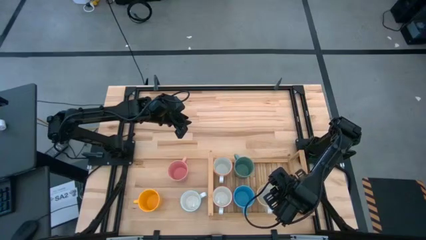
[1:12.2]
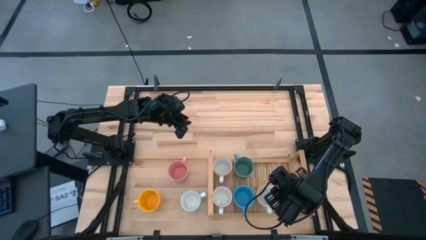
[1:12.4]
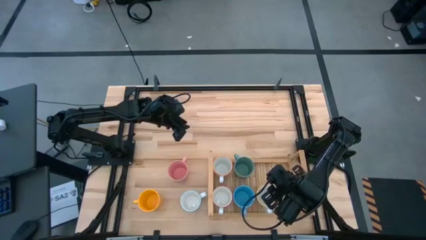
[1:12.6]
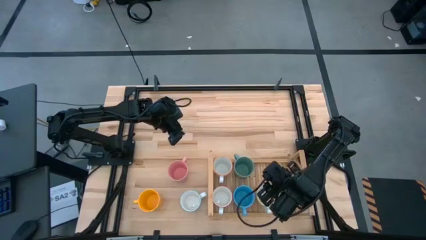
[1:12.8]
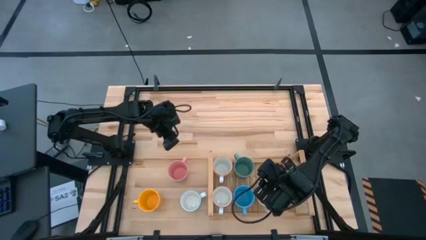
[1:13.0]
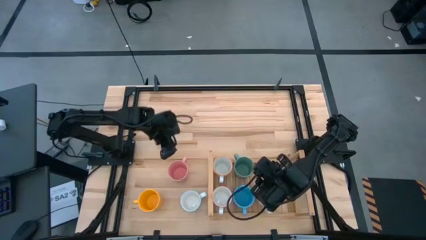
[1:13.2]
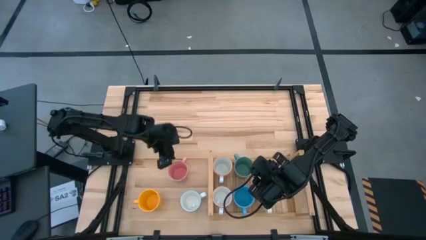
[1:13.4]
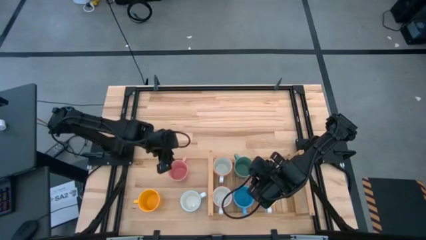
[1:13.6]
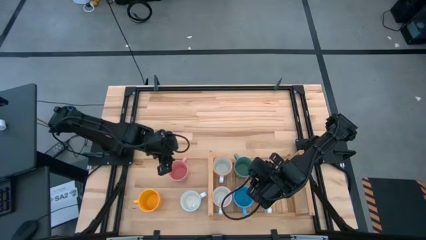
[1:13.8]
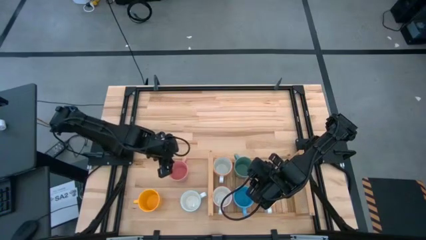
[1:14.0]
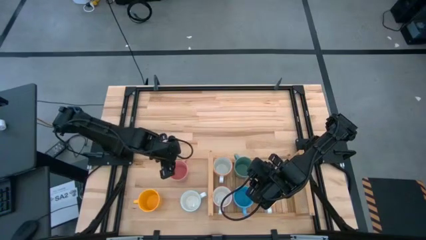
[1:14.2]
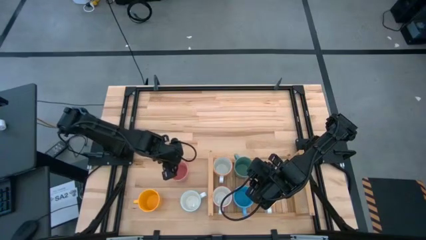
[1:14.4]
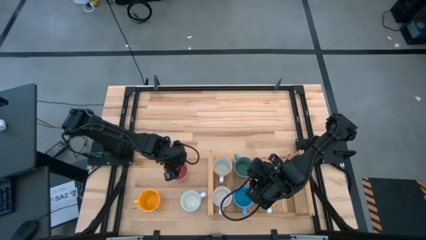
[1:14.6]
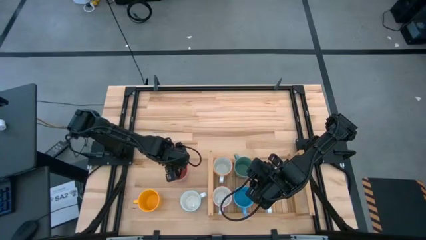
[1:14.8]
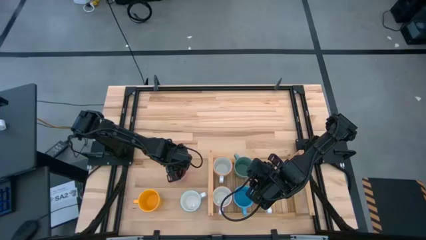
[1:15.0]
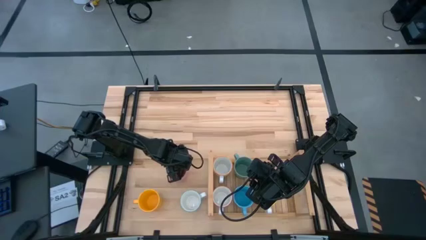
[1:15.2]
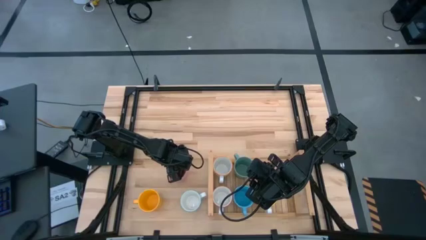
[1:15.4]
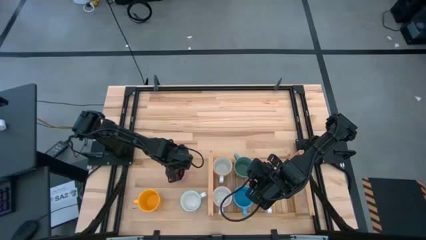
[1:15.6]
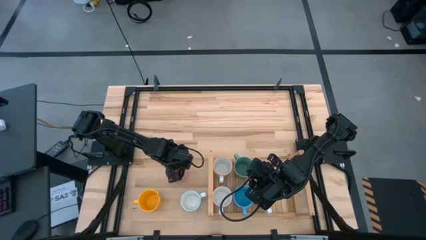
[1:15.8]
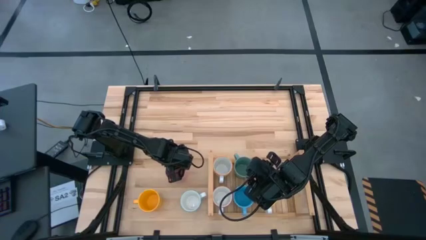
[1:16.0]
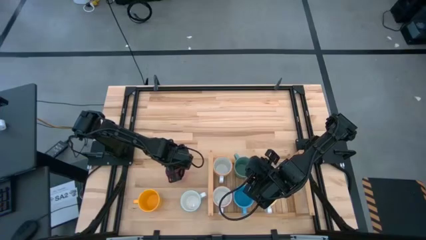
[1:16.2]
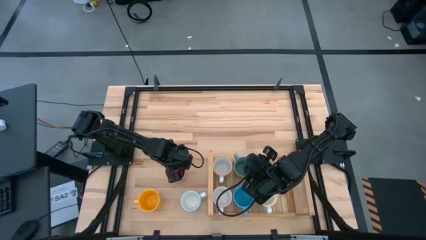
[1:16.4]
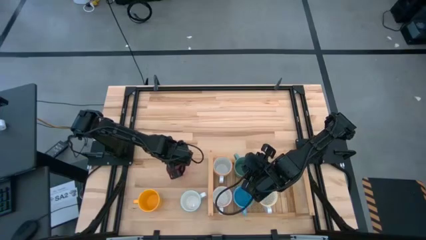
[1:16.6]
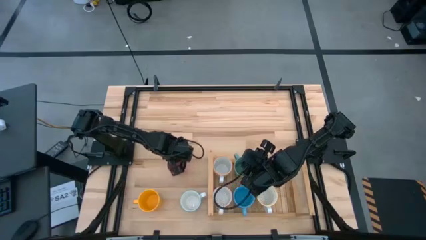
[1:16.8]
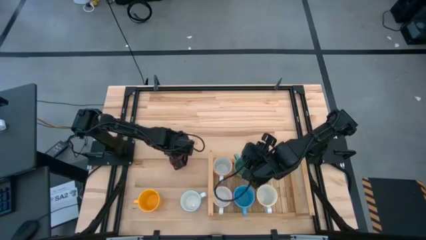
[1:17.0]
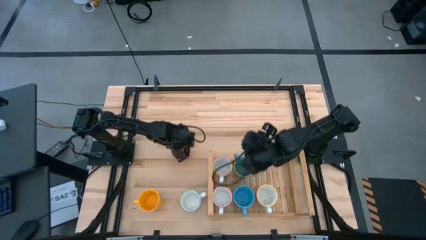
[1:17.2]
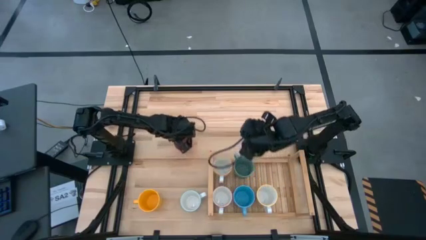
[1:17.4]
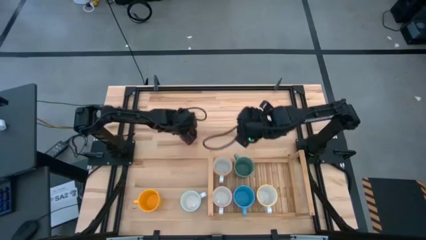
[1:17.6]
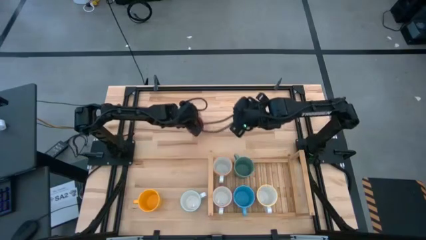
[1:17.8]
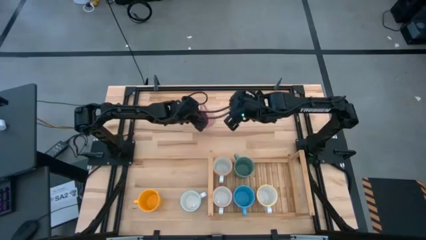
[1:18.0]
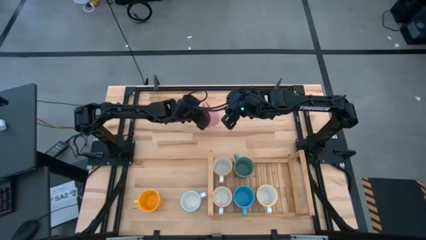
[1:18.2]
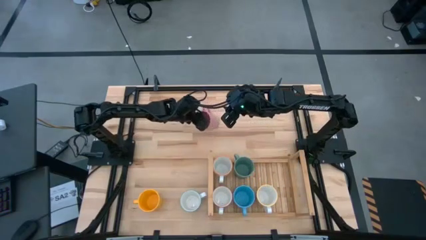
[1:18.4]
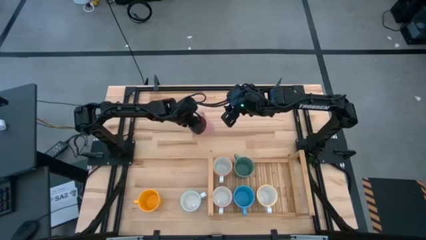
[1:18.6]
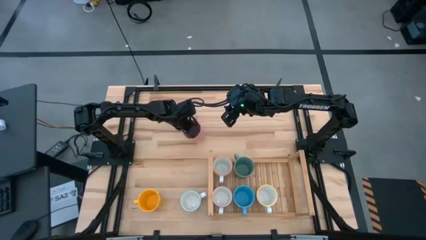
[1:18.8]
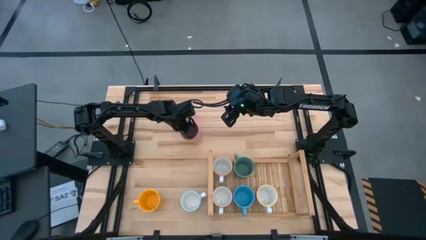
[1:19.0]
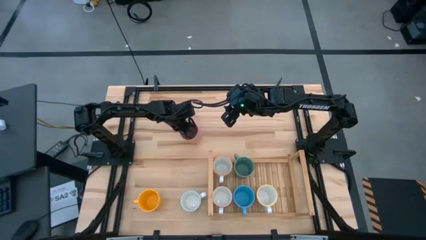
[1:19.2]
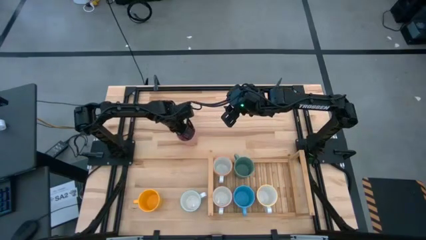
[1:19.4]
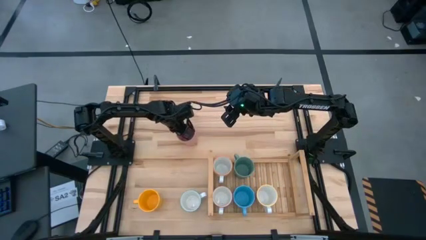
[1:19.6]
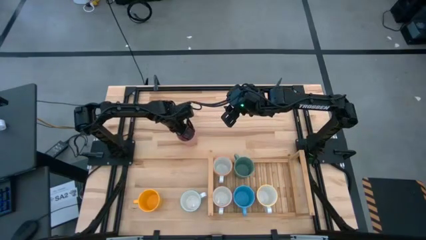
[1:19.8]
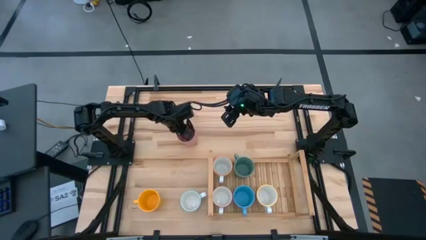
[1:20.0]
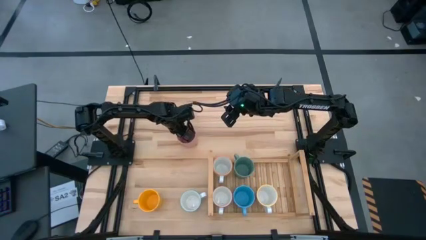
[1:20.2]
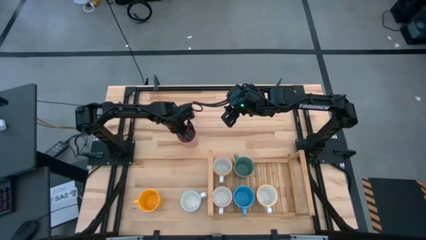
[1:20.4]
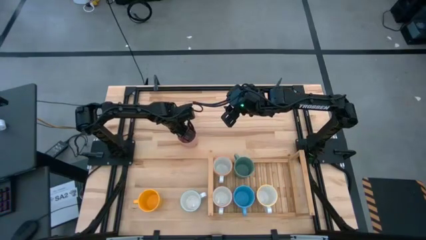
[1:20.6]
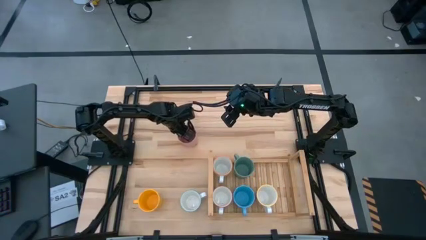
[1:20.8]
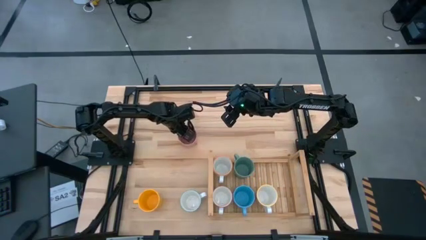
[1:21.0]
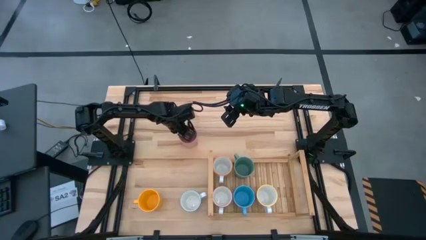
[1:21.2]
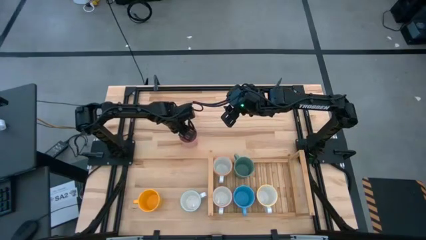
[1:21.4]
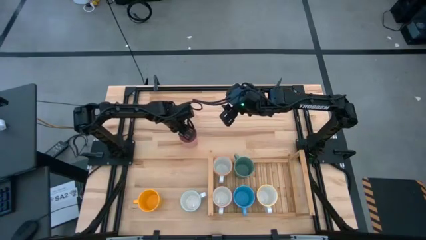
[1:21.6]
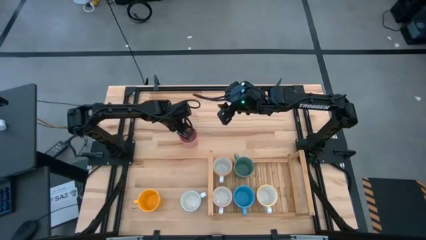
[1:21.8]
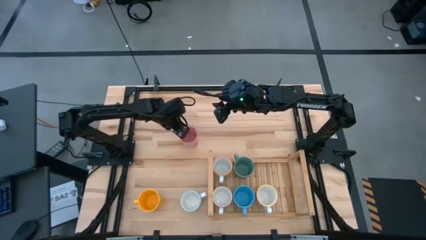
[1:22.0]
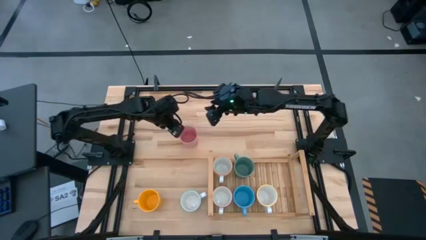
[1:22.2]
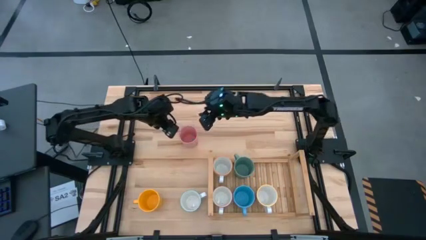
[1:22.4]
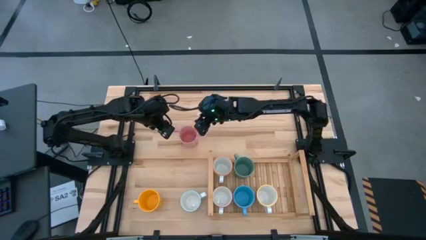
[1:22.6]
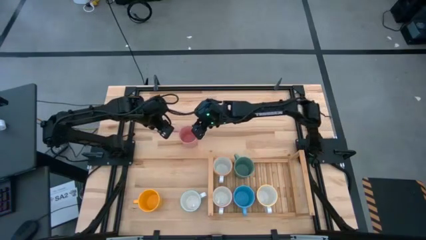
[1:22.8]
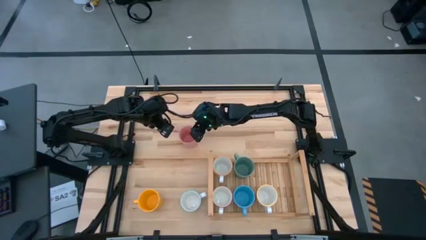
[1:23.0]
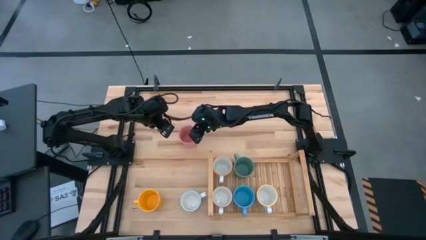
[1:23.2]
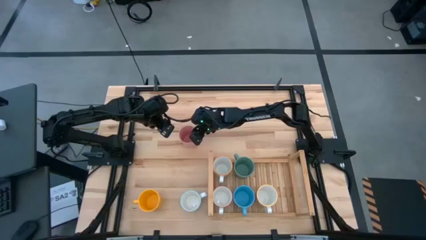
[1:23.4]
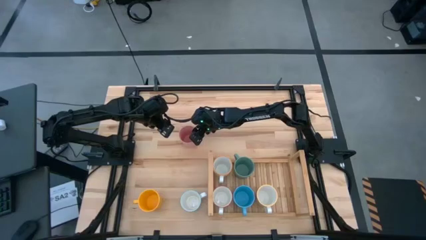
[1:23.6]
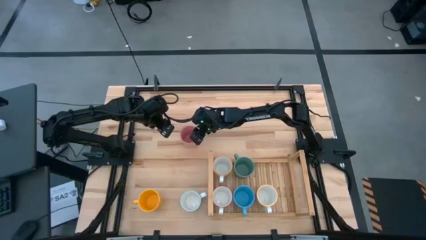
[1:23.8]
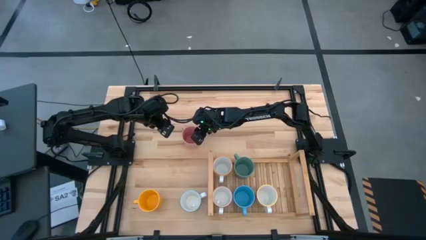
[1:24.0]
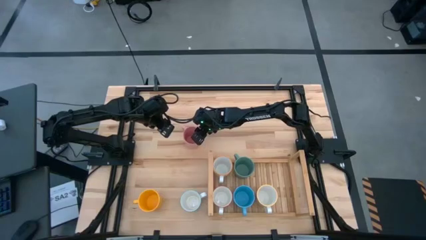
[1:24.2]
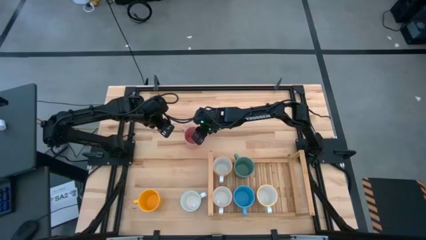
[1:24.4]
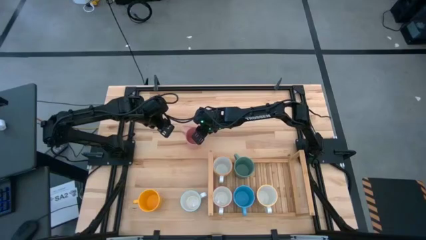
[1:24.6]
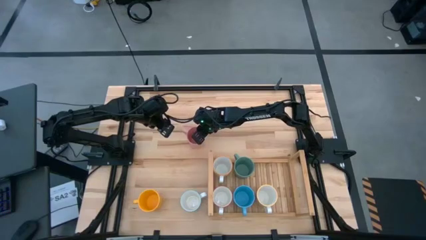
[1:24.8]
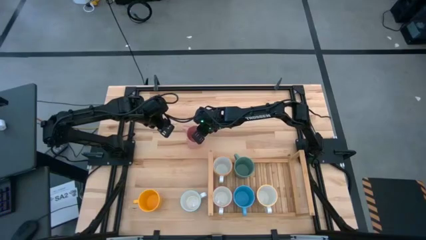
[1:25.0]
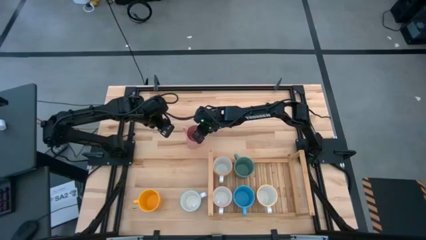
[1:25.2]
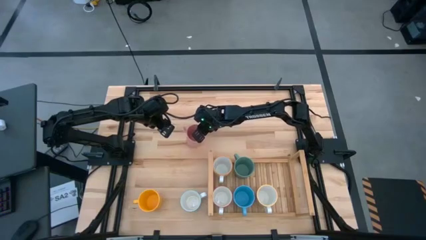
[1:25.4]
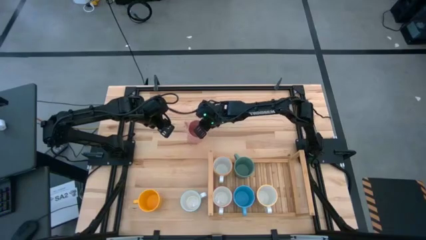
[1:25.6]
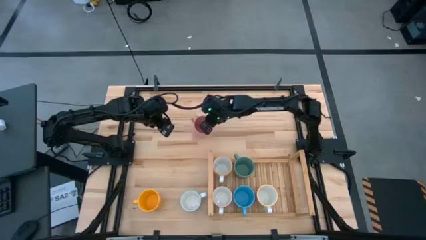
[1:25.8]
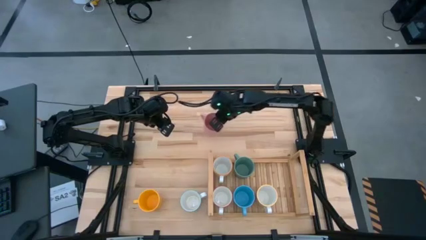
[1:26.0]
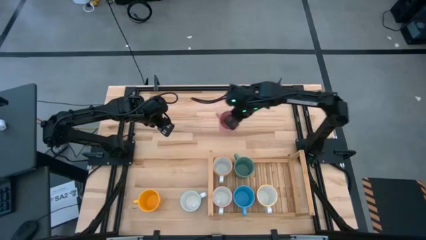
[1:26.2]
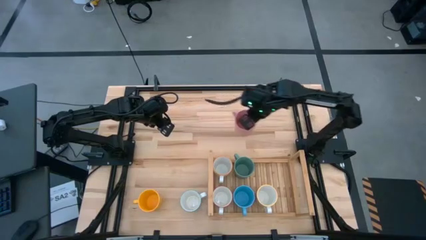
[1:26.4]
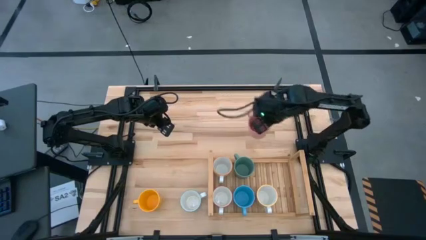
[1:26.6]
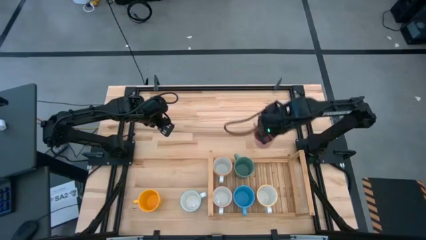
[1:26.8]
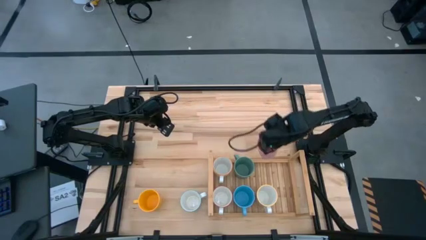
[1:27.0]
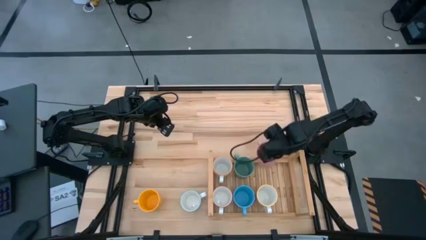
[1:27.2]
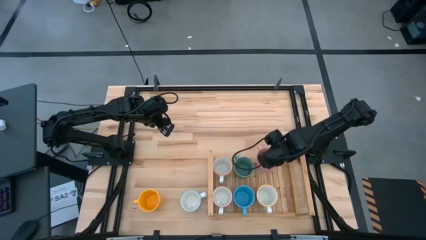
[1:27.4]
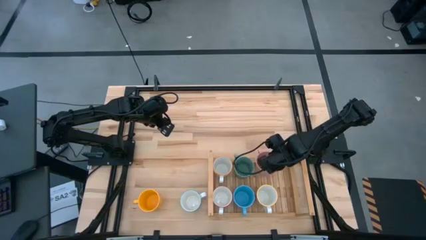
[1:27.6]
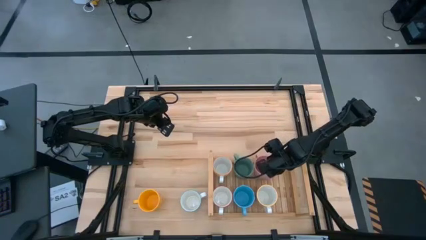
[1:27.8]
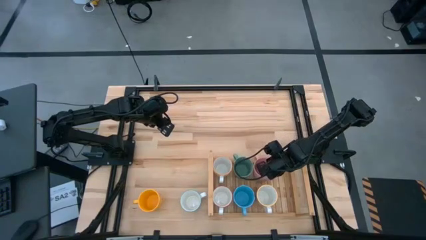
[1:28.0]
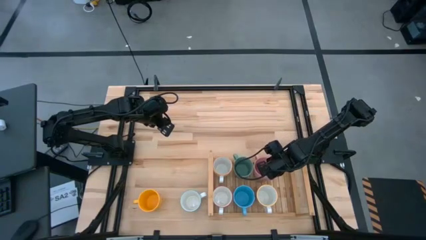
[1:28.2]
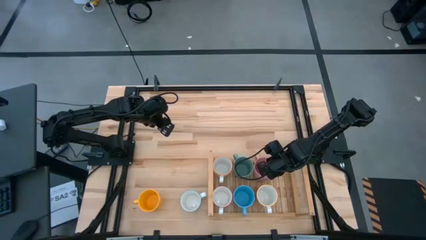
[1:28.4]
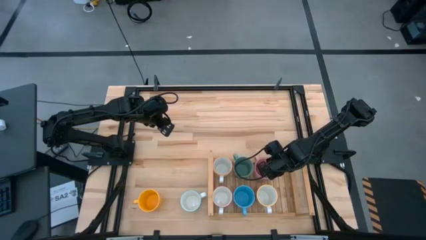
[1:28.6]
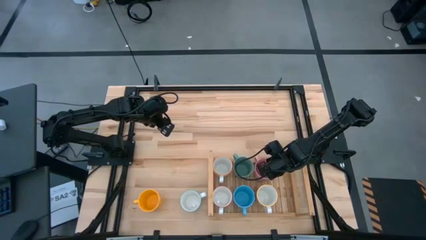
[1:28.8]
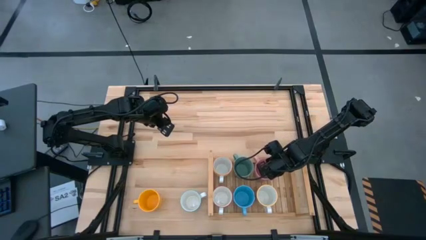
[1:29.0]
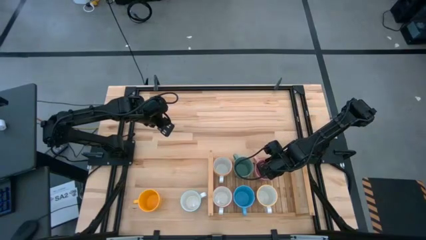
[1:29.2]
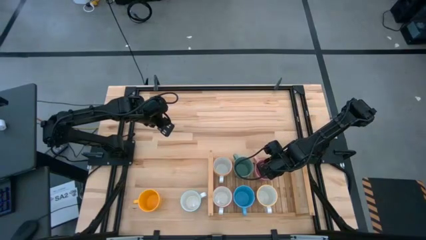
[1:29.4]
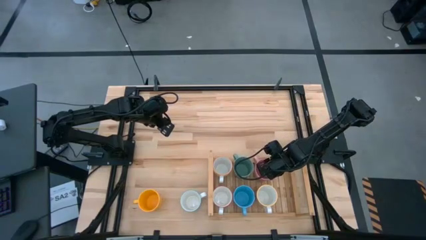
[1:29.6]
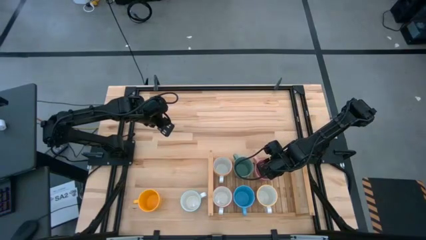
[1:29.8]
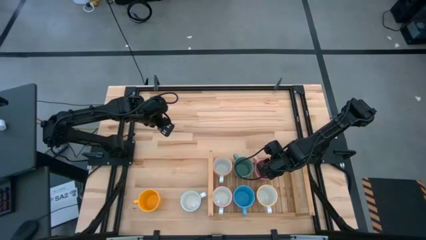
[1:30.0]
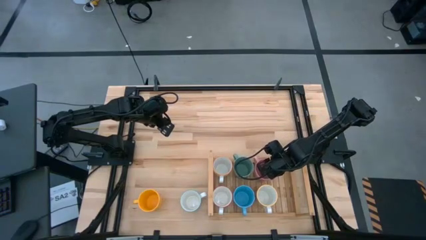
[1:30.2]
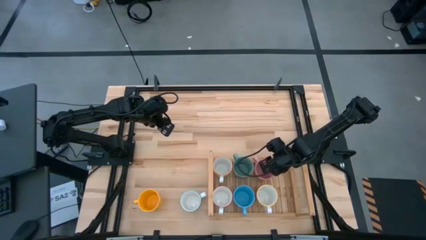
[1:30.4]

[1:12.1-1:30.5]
Task: Place coffee mugs
Put the pink mug on the shelf
